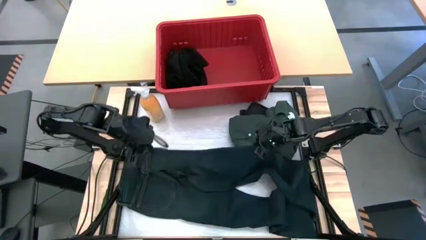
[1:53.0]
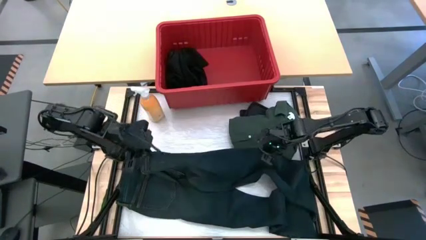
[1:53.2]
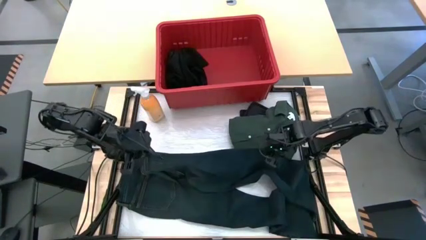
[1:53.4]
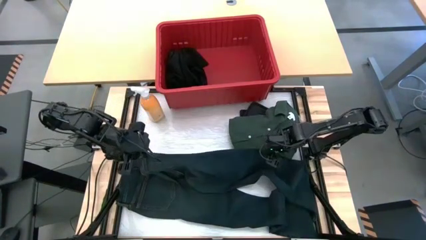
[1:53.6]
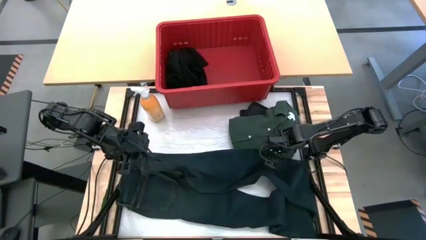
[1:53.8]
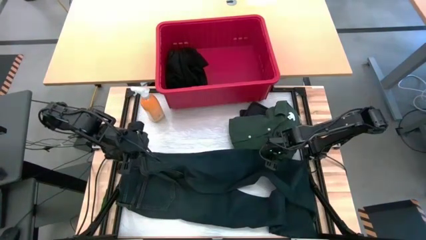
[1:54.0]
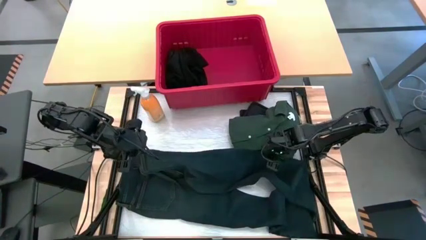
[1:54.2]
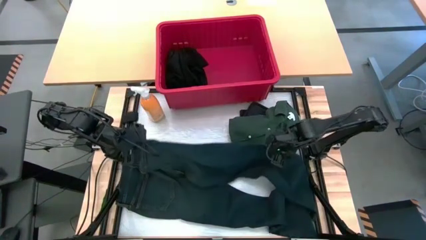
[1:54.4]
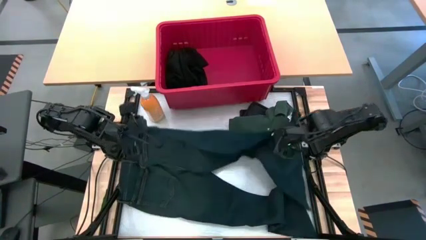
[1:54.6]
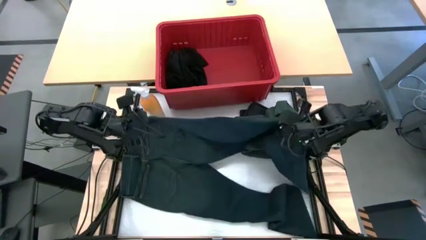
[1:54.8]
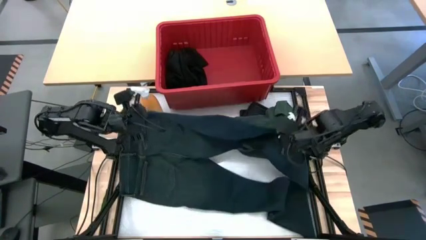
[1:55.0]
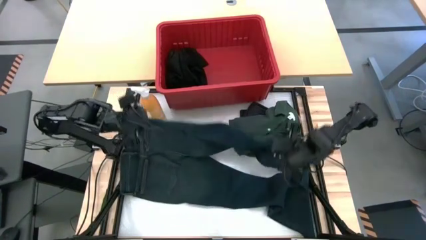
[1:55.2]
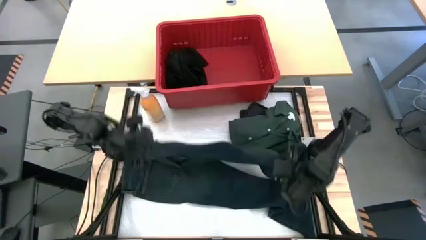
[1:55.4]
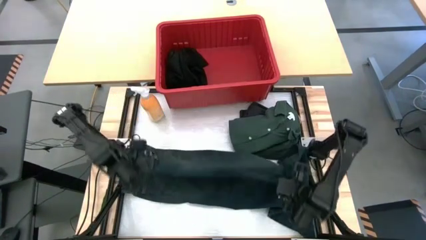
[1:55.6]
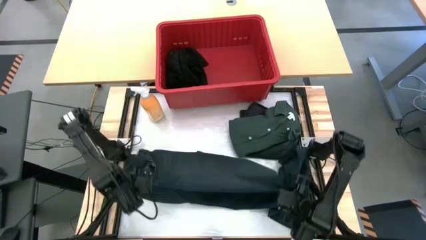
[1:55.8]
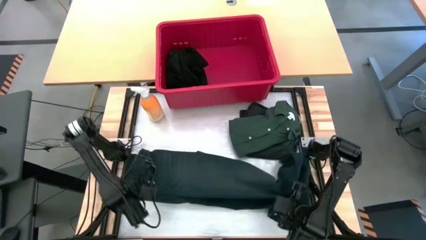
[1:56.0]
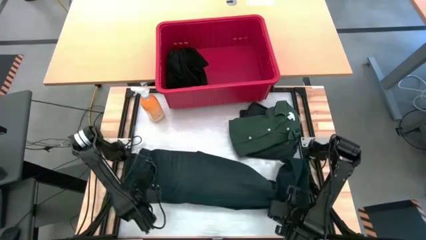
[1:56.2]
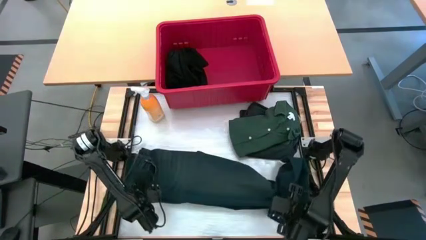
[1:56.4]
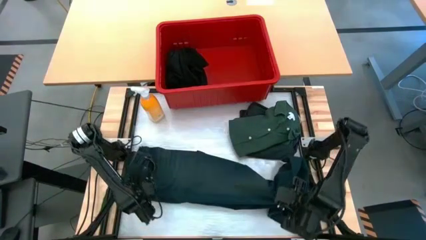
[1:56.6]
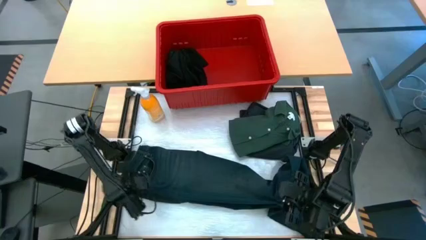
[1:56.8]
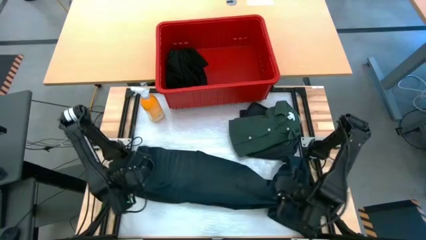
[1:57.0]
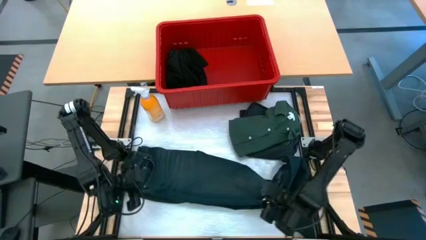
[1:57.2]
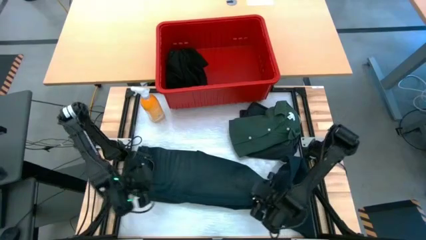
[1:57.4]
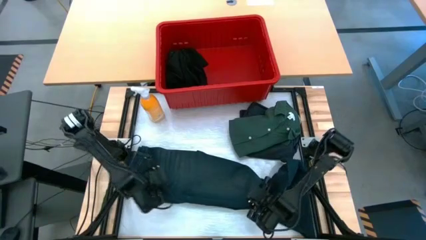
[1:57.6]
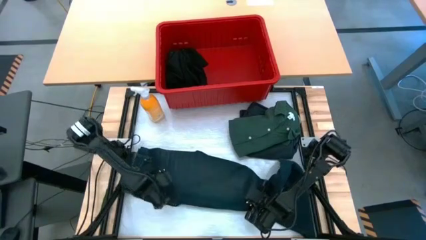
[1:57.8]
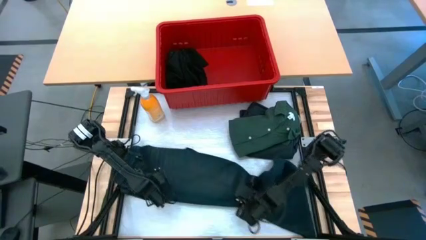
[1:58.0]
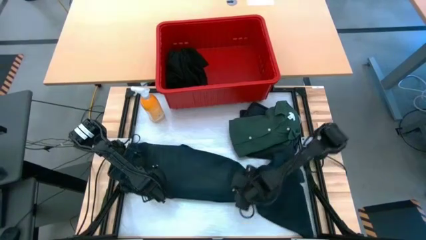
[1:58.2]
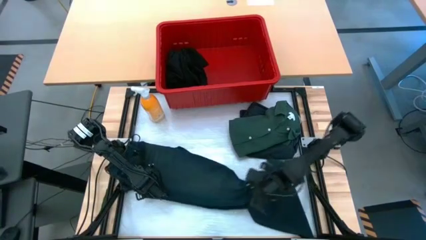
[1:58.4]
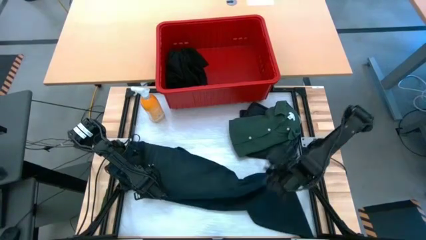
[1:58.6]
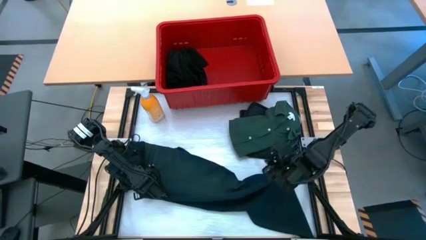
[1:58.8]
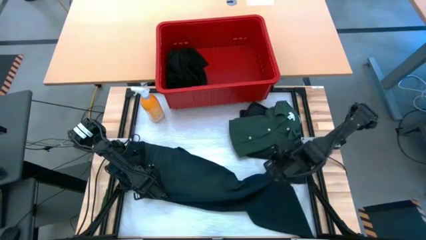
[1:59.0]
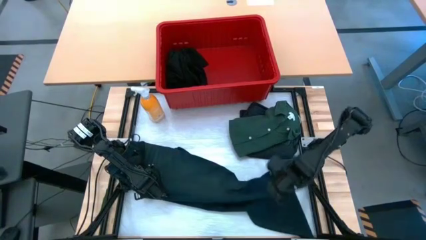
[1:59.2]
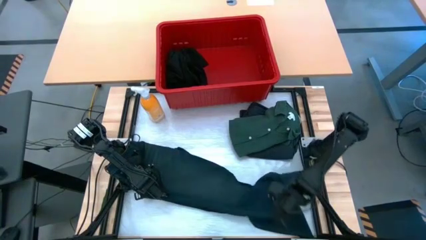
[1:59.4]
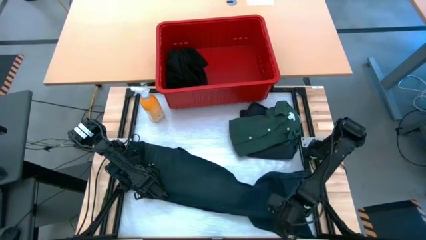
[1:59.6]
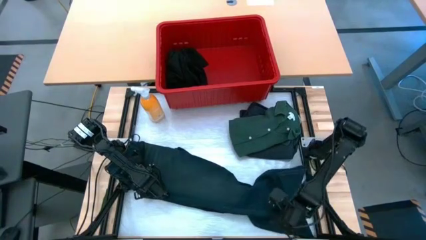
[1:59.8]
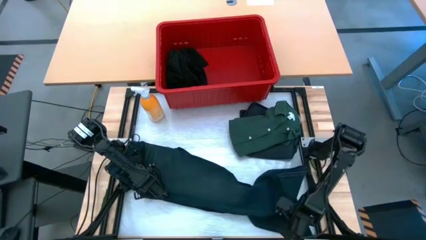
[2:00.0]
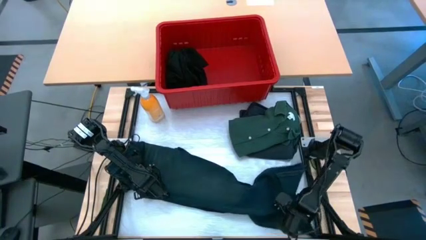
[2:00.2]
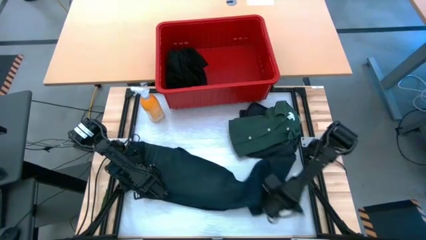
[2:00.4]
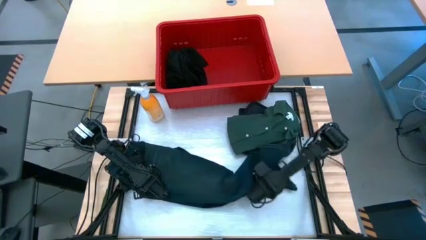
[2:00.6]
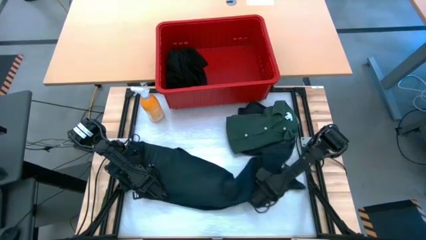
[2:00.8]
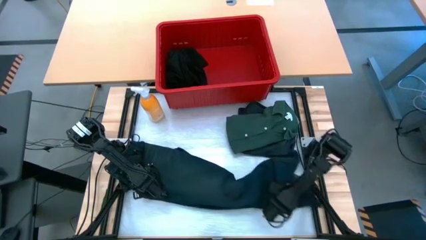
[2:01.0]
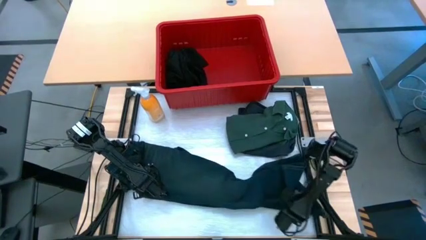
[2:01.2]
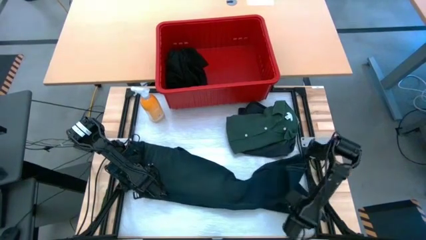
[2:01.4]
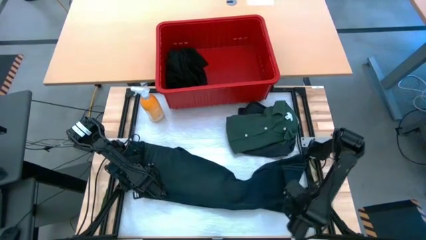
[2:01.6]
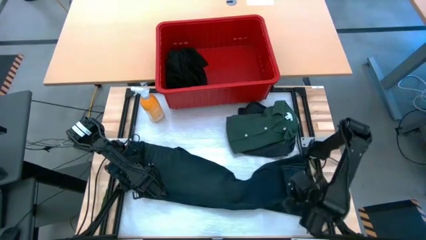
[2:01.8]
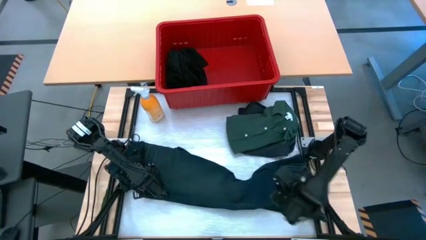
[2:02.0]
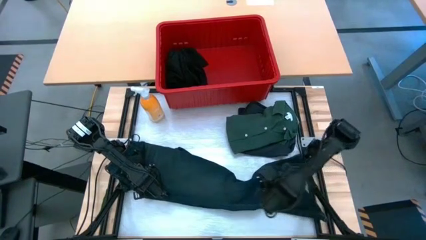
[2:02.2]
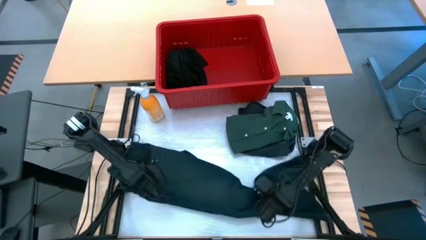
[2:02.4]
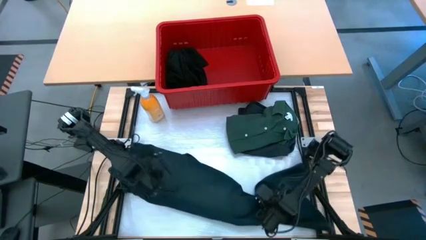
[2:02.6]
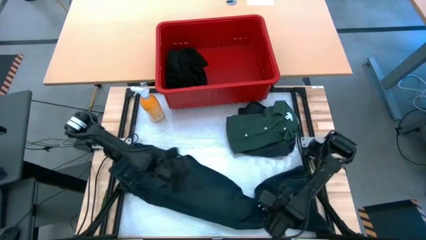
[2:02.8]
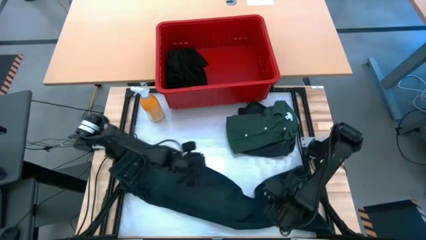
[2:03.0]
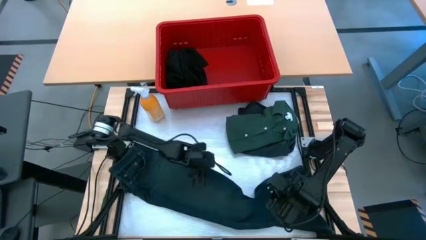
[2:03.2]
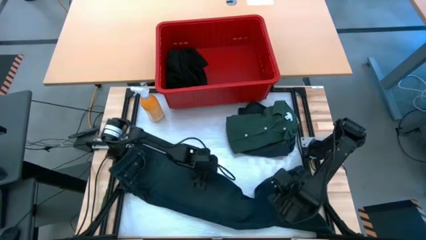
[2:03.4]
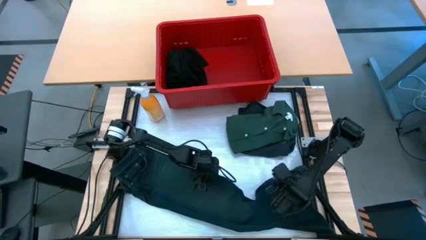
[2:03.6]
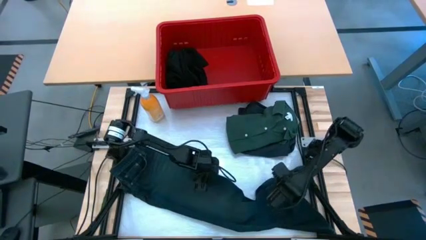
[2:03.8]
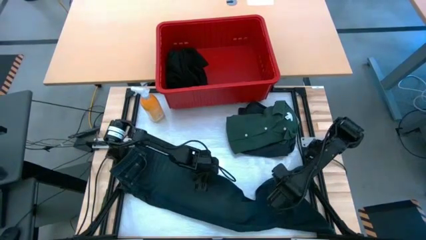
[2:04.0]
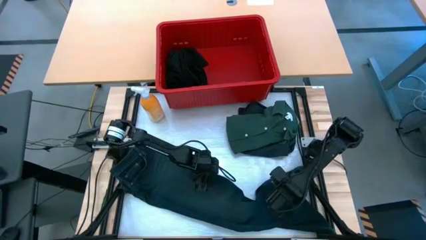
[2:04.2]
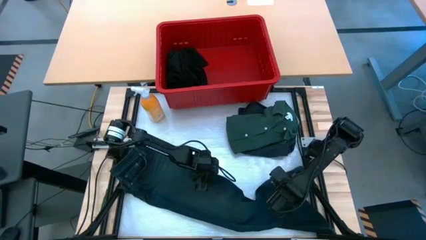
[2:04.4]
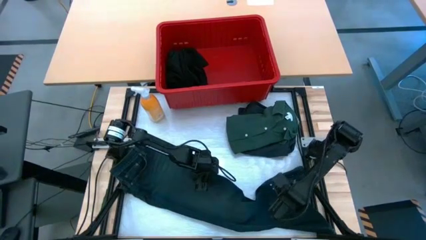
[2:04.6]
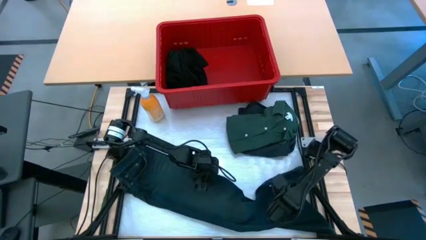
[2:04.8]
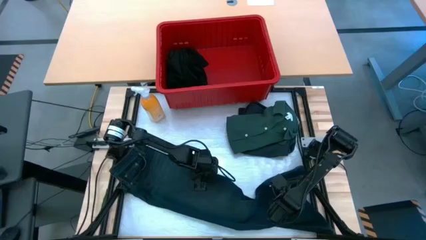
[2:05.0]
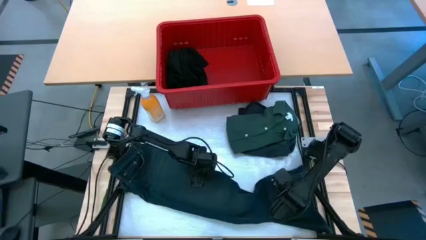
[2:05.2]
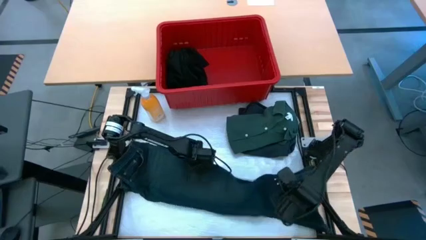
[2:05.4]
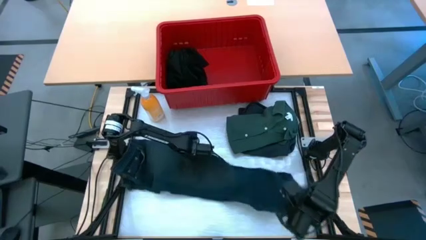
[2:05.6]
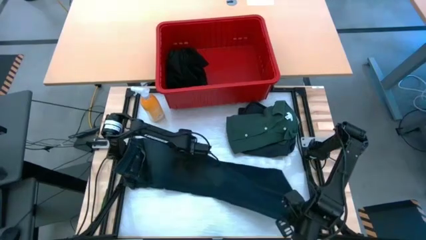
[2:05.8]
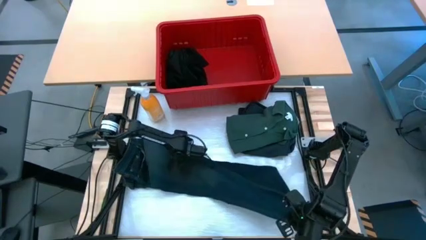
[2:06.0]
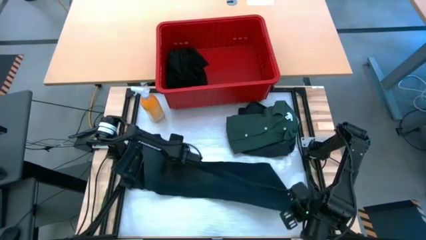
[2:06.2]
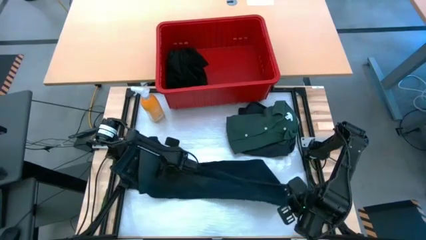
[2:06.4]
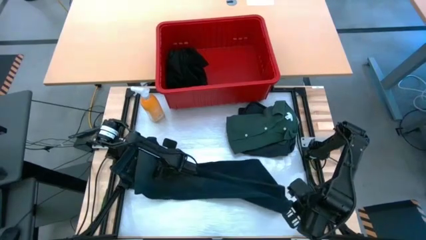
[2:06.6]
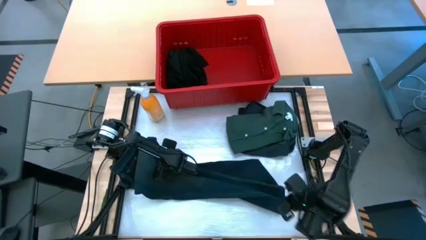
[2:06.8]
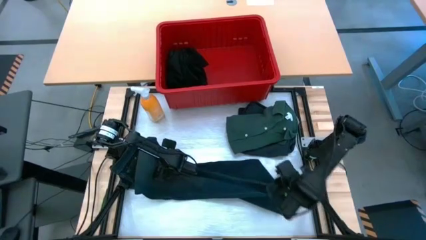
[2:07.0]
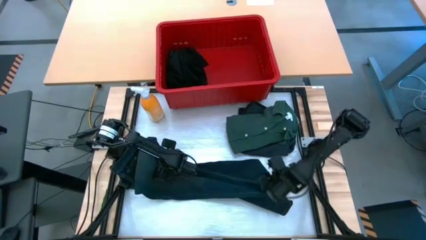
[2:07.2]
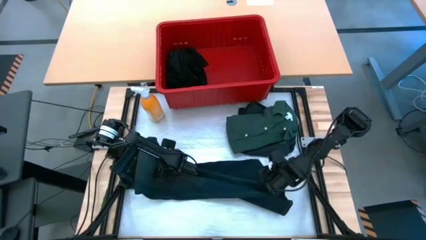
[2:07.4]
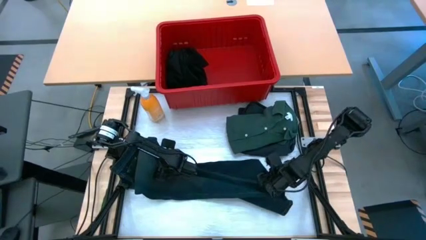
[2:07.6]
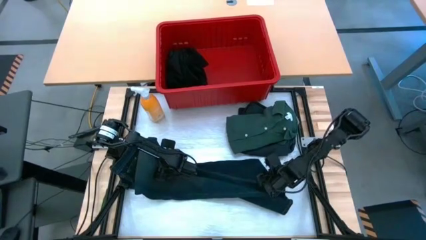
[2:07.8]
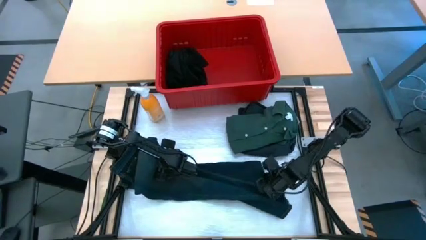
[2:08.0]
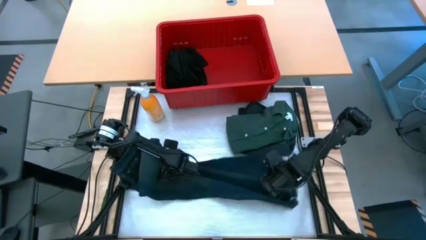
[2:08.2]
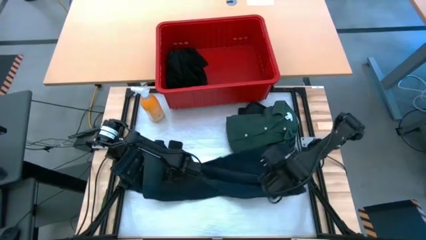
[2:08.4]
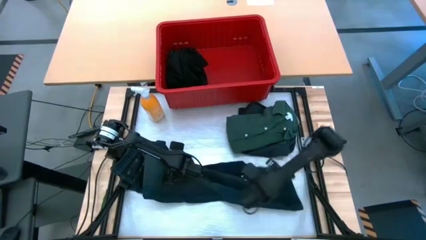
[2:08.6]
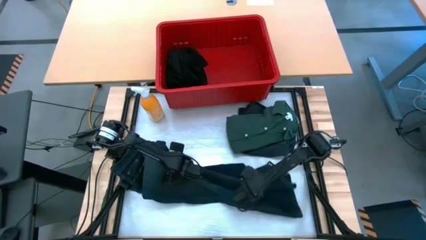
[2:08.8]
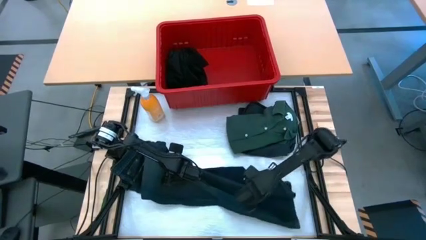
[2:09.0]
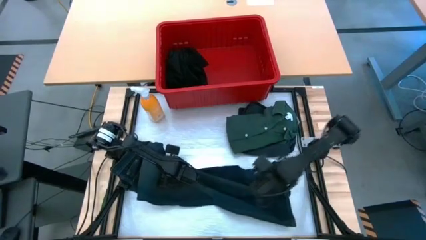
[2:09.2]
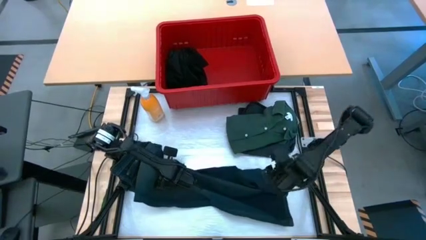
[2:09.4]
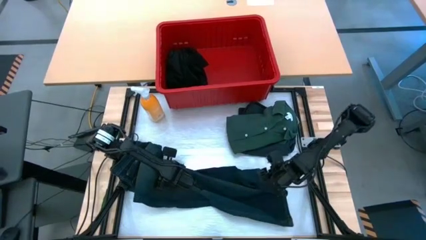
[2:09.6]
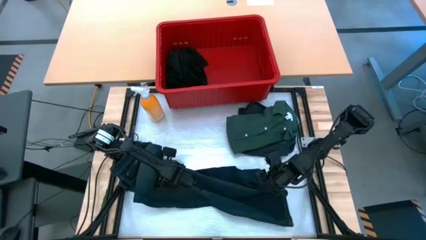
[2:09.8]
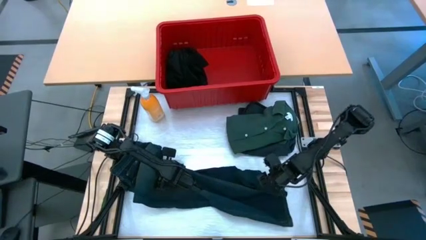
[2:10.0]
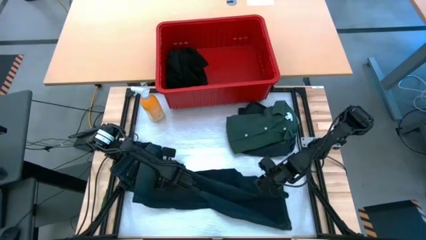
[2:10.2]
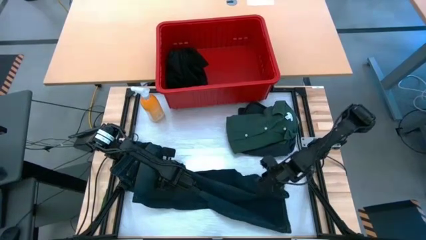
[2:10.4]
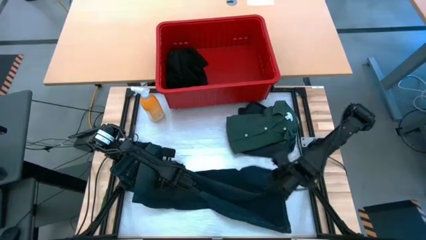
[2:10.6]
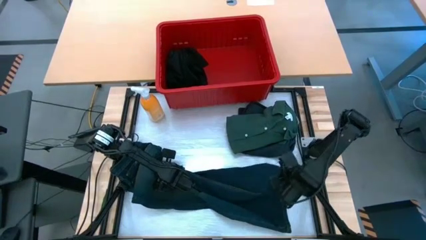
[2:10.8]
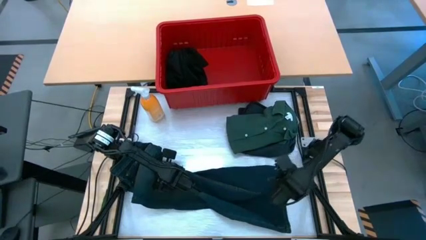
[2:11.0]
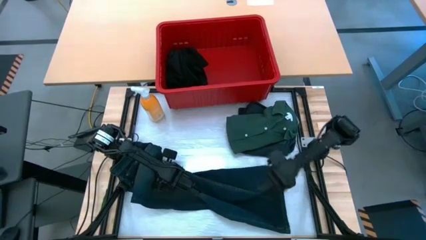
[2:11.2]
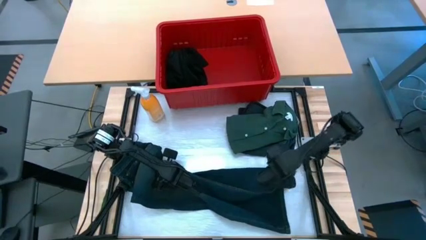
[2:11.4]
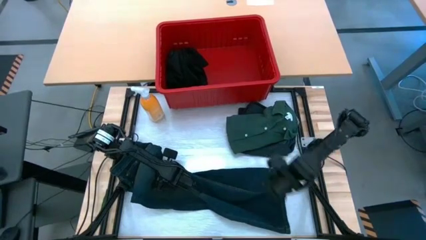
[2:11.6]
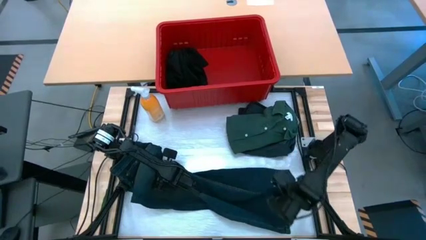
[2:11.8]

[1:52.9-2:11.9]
Task: Fold Laundry from Bin
Fold the blue pants from the red laundry bin
